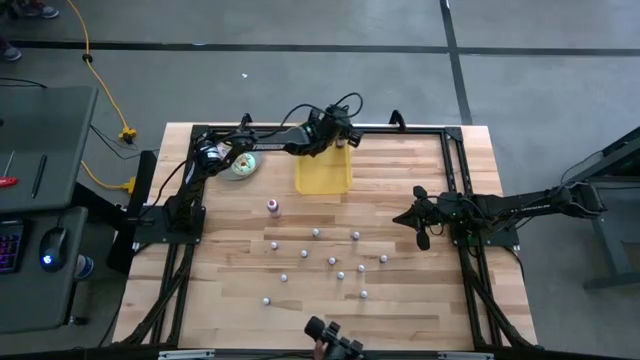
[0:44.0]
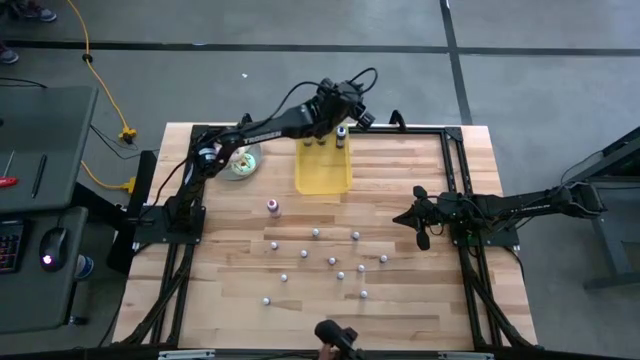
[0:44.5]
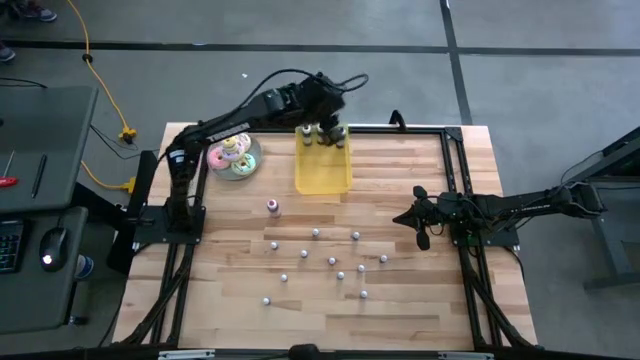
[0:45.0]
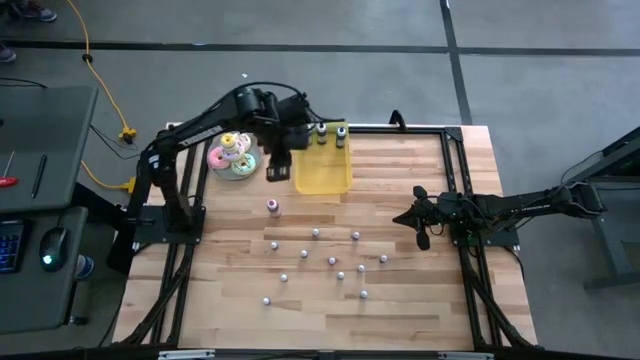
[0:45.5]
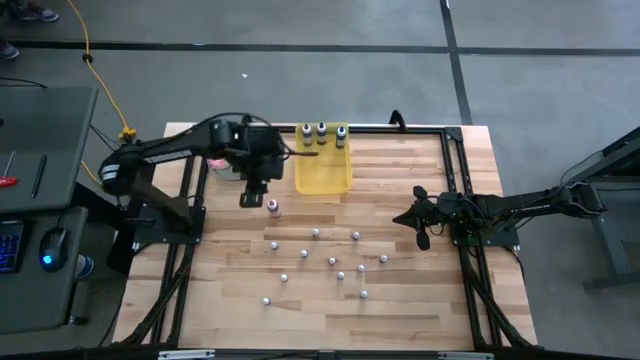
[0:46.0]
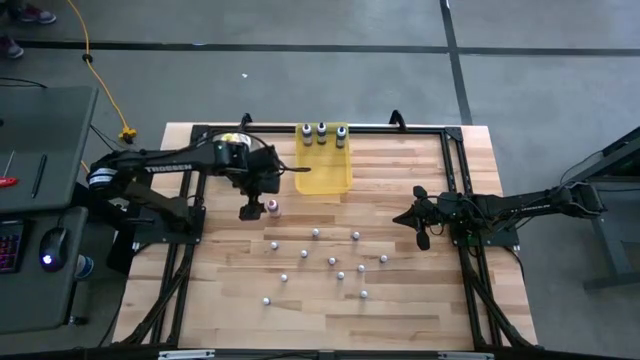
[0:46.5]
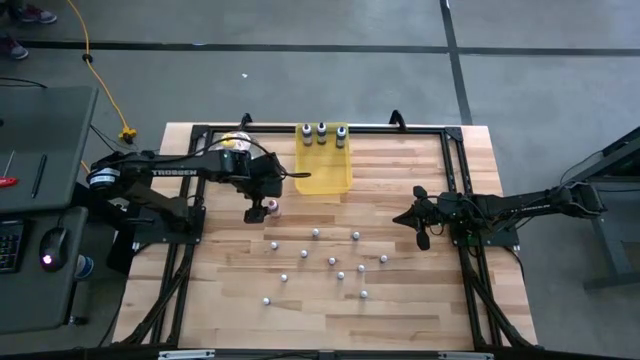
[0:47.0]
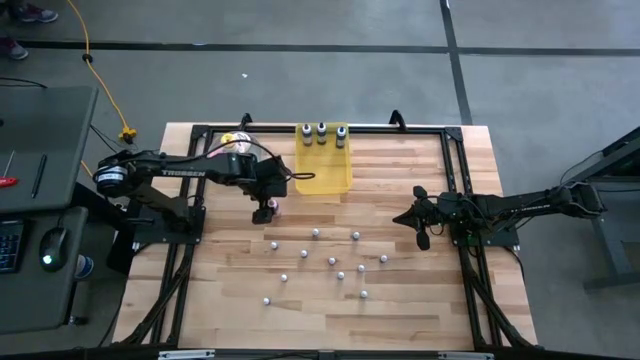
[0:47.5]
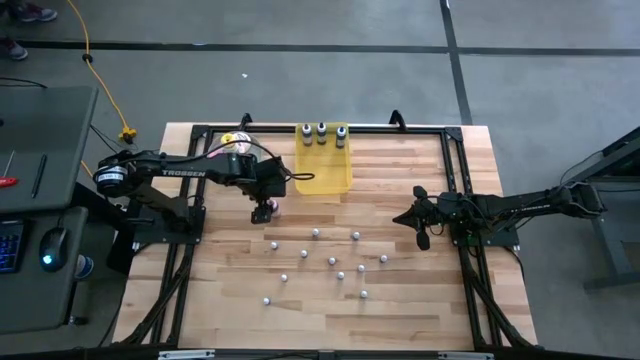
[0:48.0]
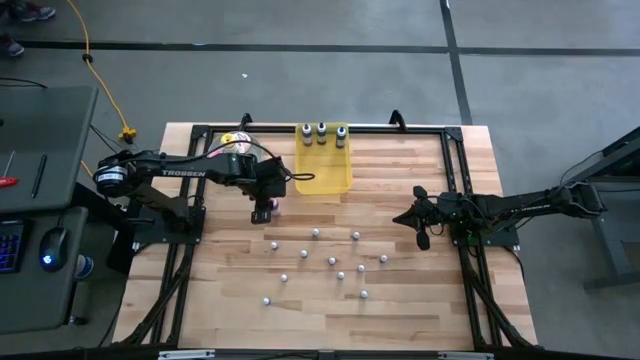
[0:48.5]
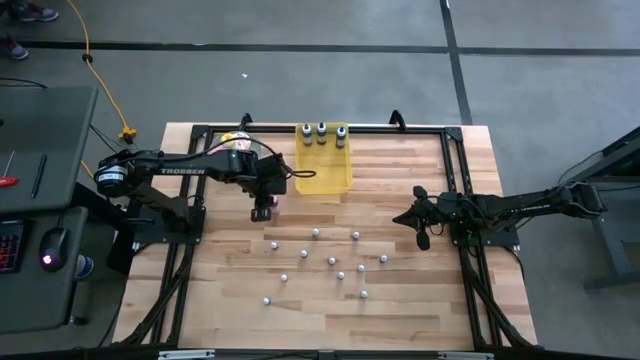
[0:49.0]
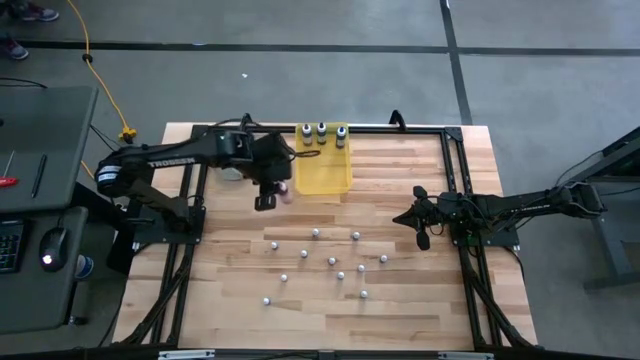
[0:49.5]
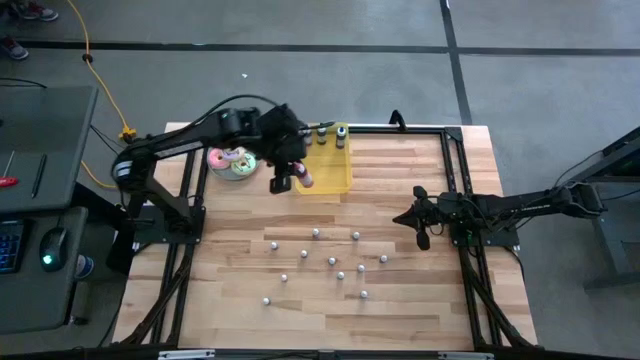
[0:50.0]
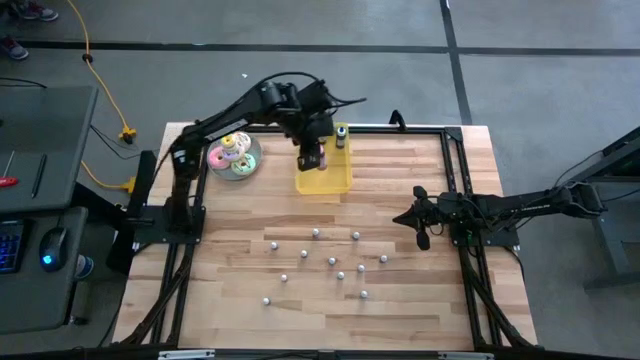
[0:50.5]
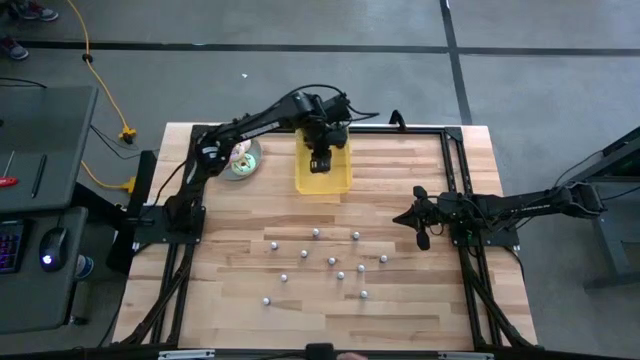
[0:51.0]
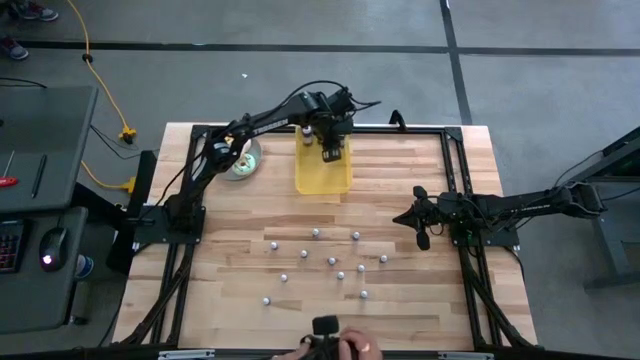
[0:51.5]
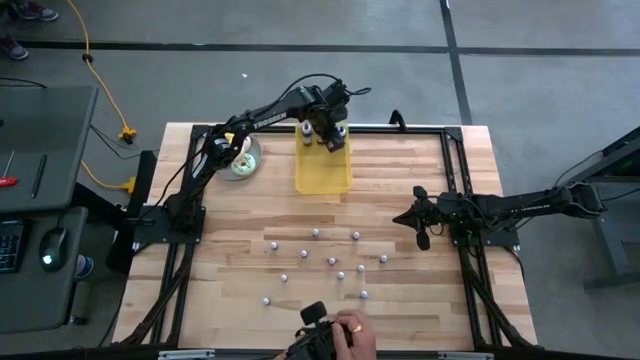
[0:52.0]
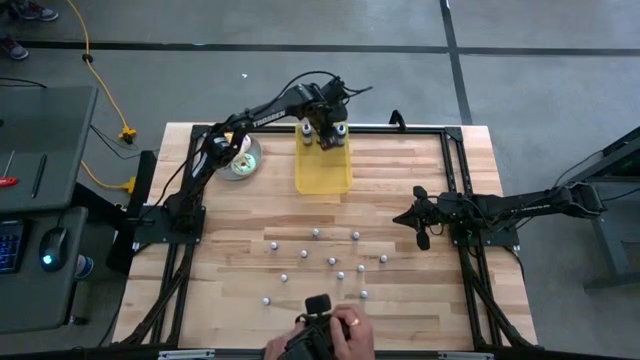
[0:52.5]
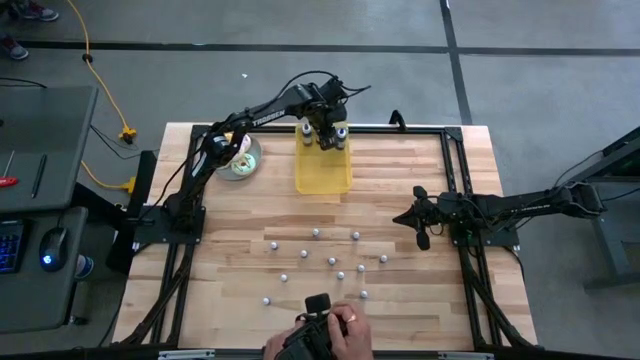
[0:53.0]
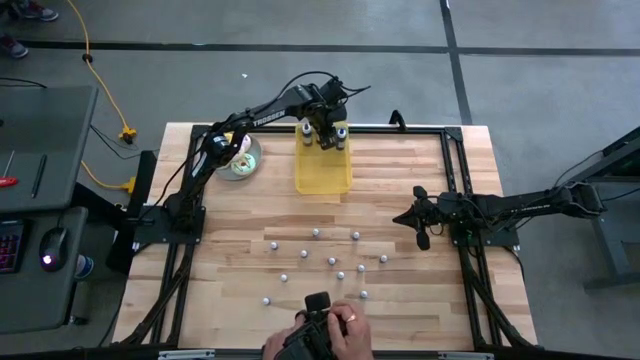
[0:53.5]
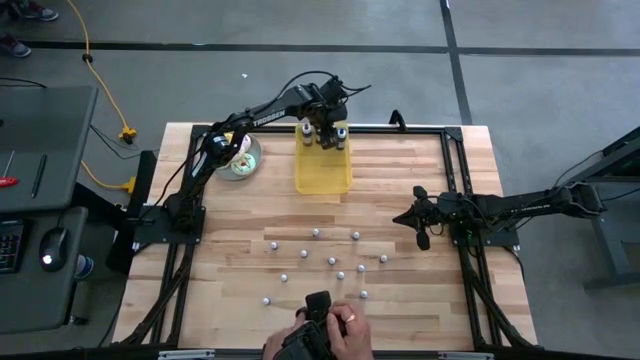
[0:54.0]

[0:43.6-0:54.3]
Task: Pick & Place food coloring
Put the large pink food coloring bottle into the yellow bin

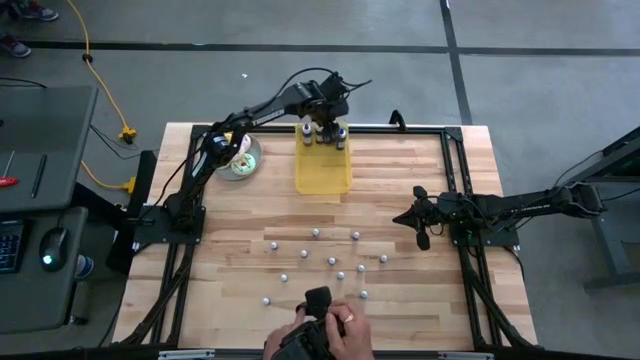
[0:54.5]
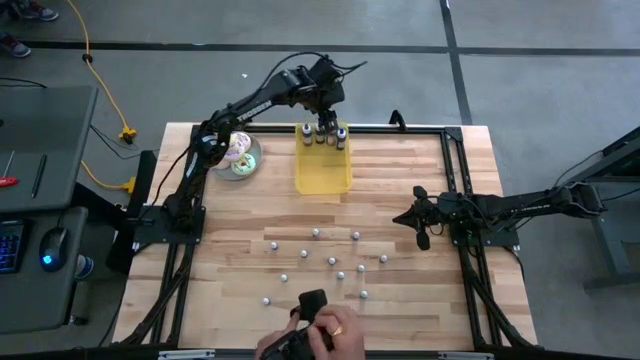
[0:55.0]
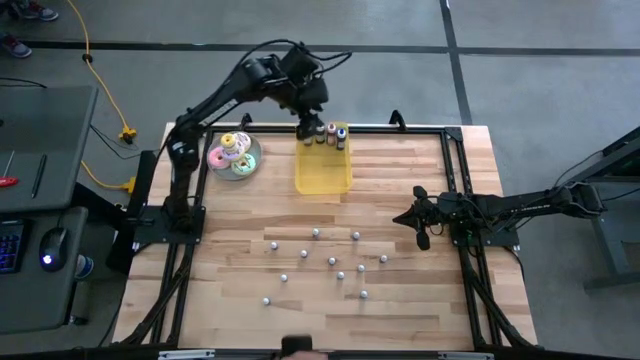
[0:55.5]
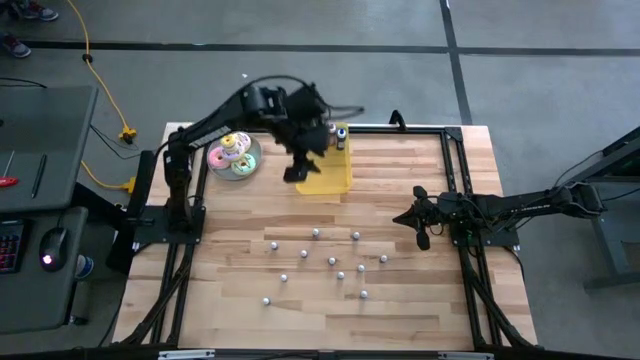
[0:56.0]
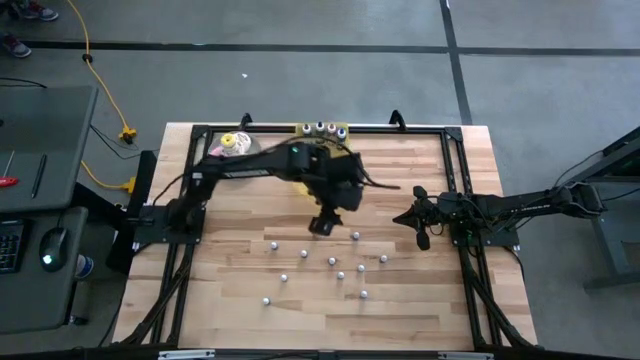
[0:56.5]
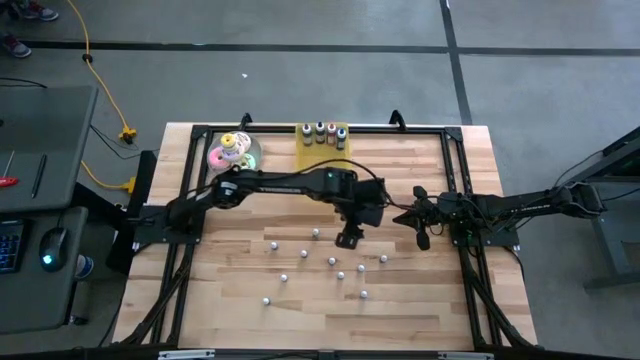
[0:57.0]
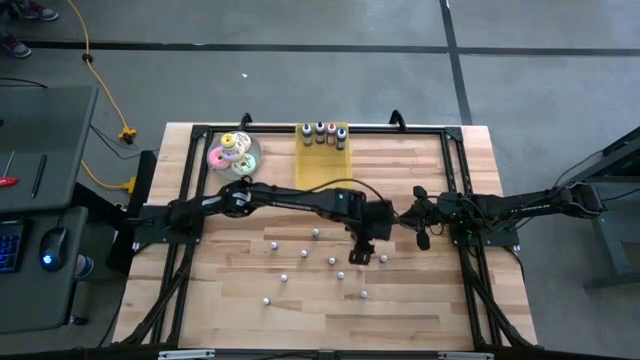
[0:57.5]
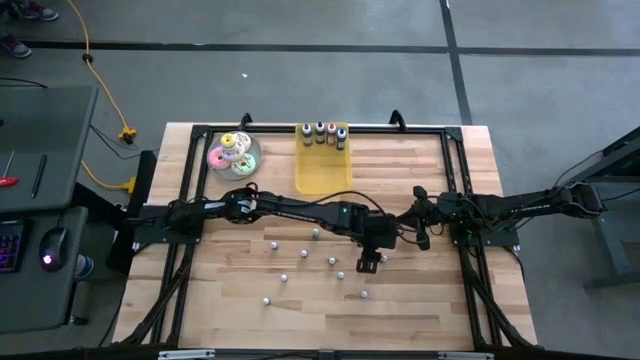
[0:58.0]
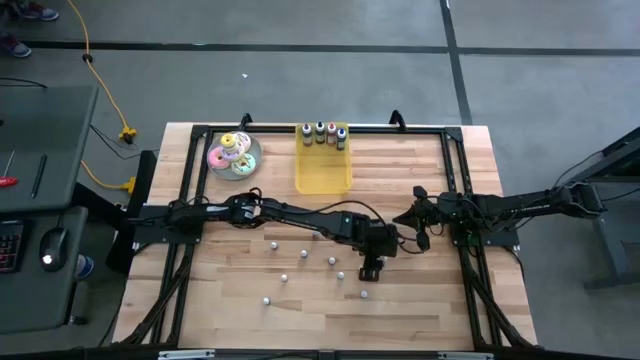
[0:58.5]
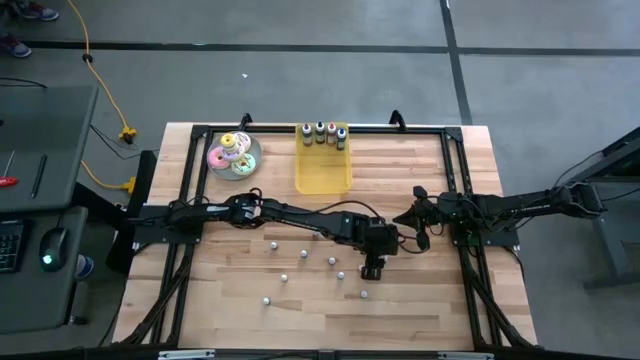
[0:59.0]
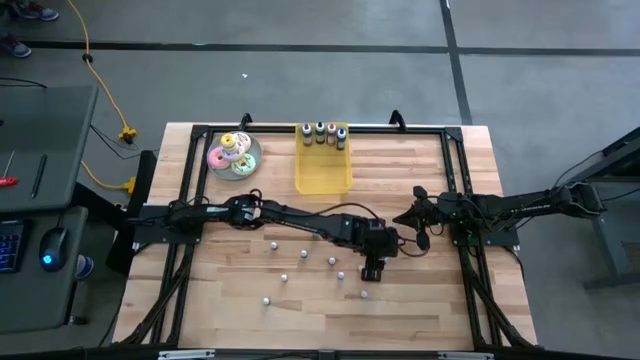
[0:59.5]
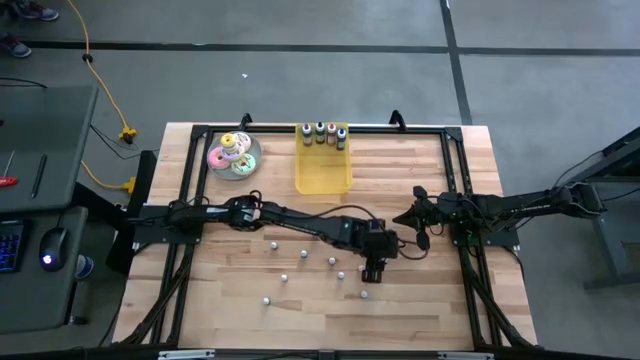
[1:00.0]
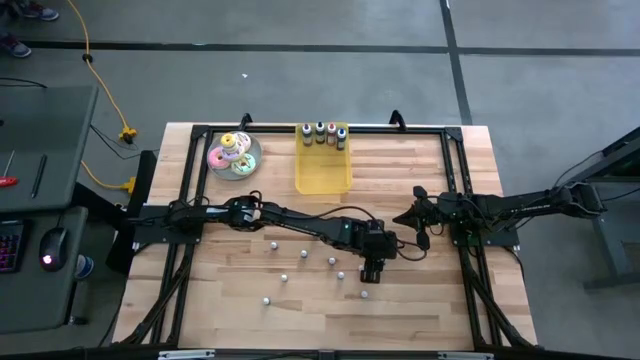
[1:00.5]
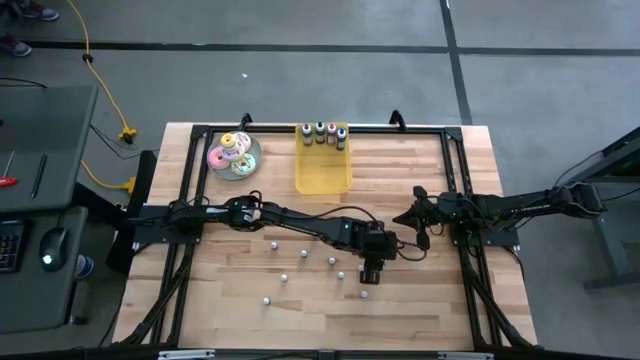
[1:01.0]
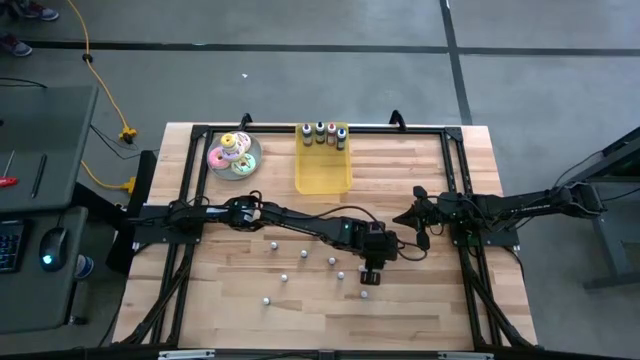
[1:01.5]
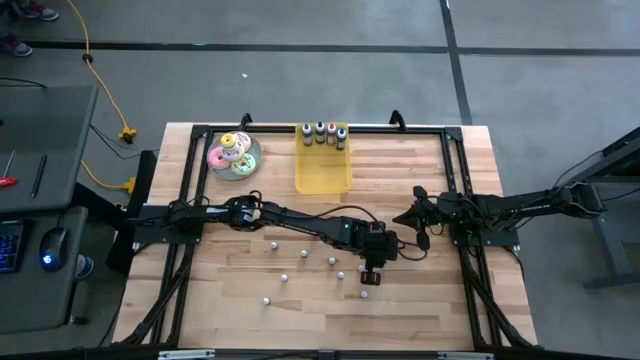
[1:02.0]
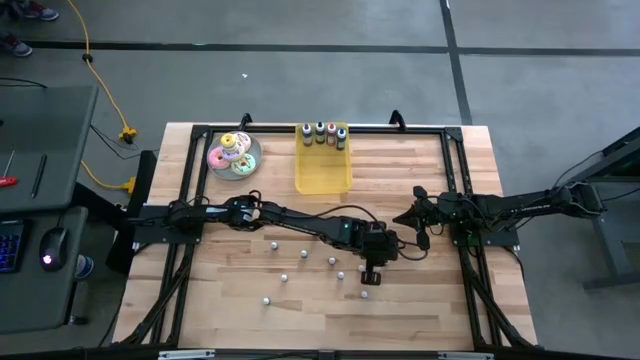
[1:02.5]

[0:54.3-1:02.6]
Put the right small black food coloring bottle into the yellow bin

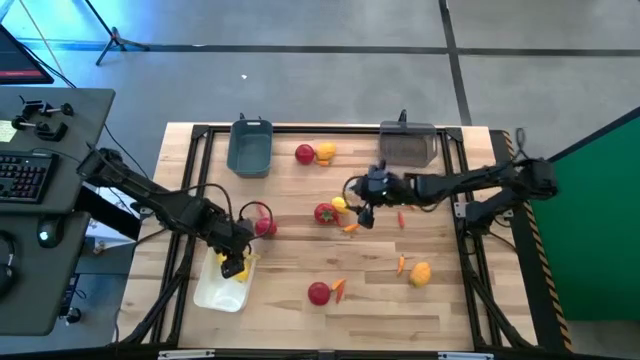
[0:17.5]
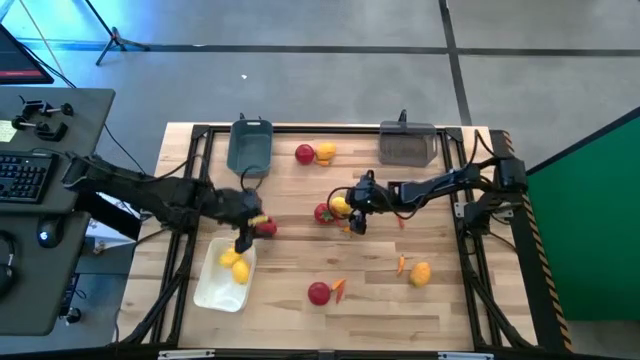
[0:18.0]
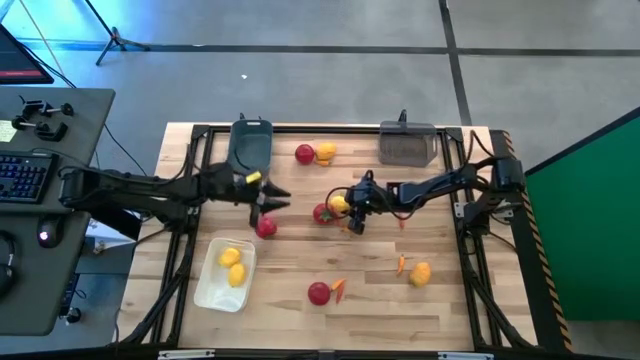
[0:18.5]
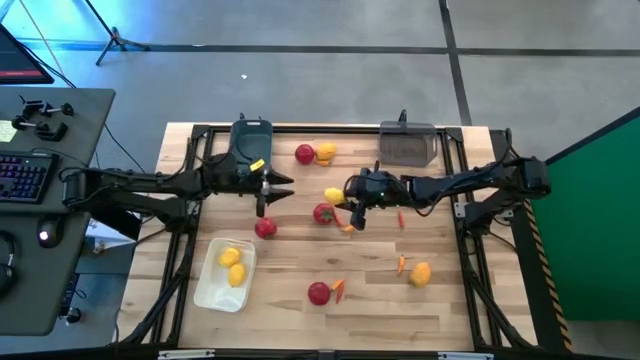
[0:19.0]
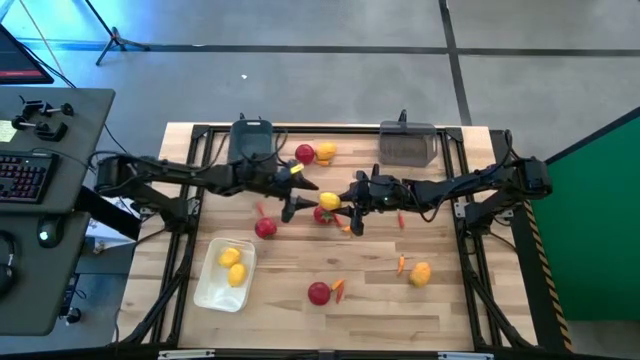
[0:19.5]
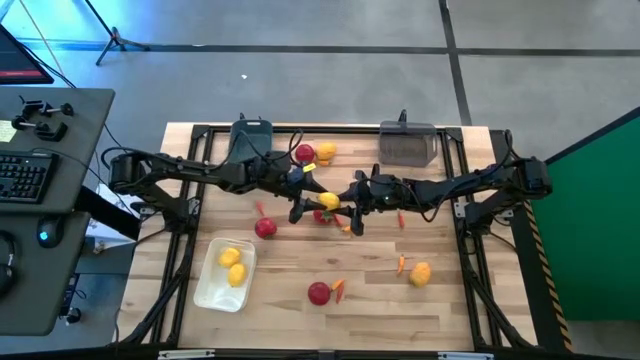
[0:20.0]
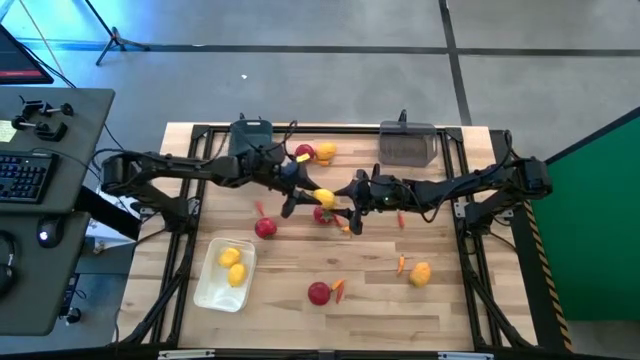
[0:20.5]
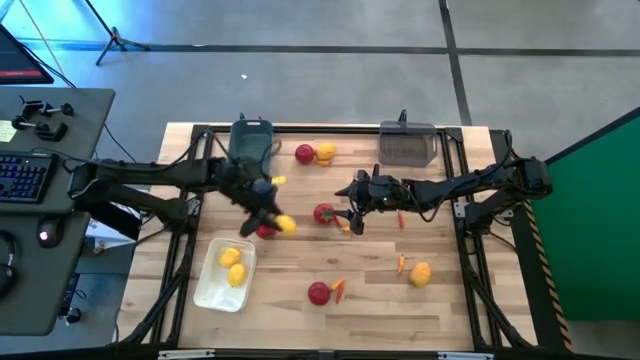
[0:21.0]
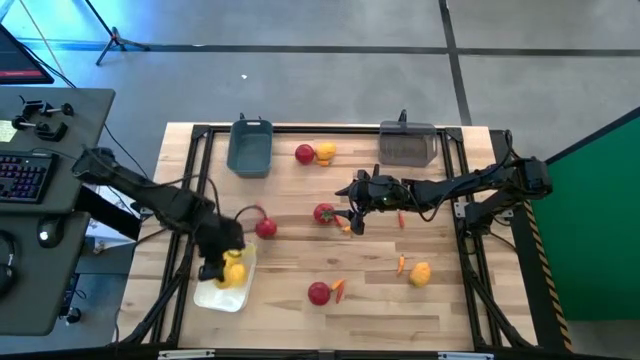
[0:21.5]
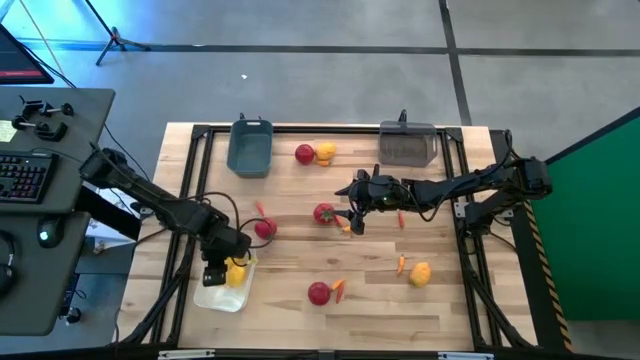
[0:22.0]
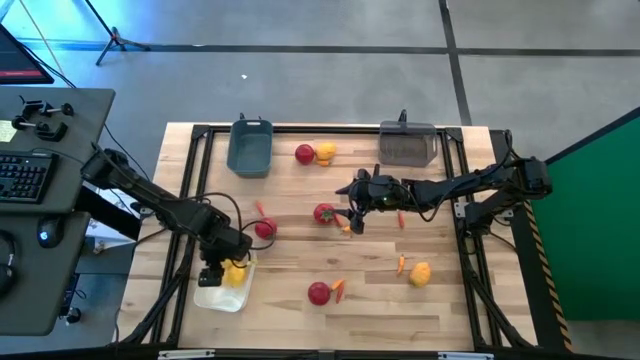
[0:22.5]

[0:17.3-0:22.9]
Task: Sort produce into baskets
Put the yellow lemon into the white bin
